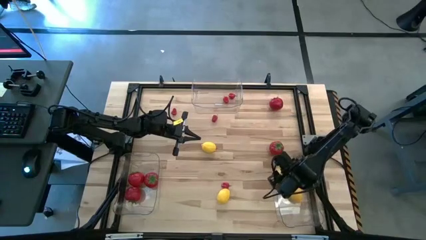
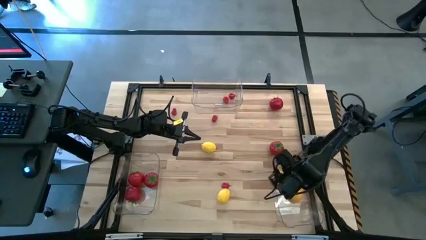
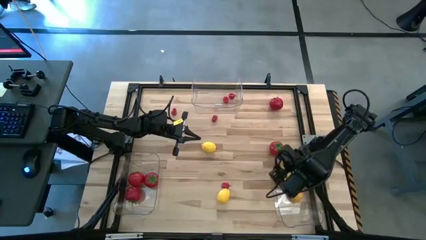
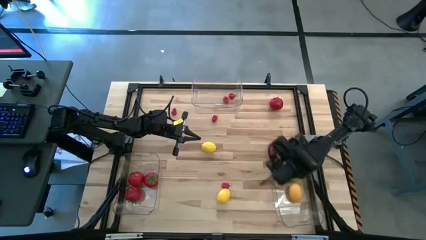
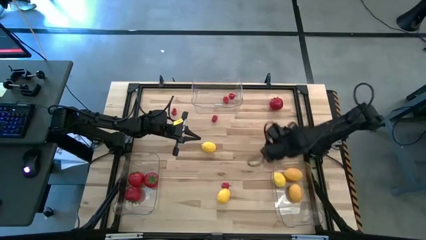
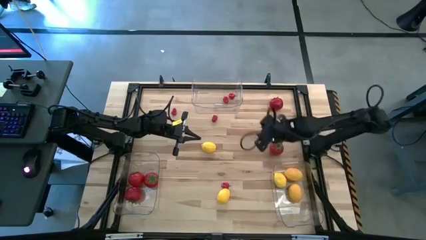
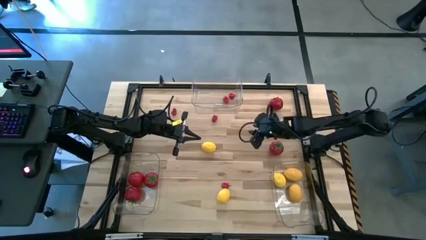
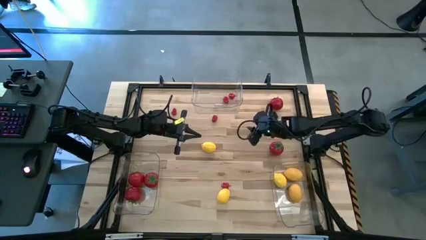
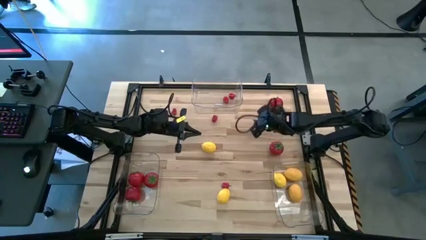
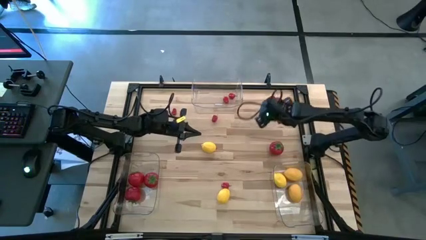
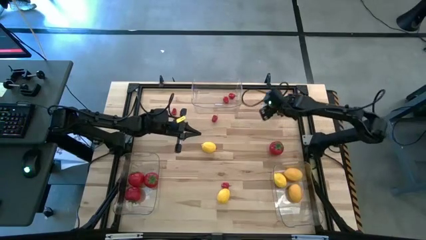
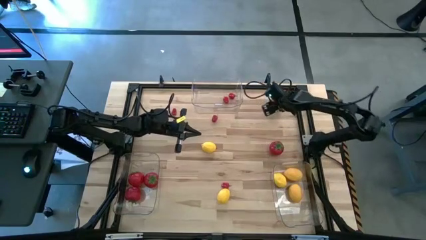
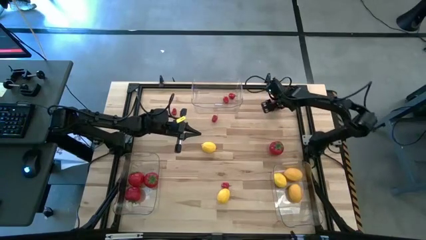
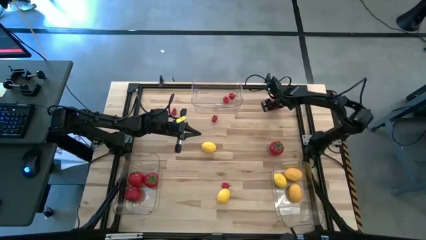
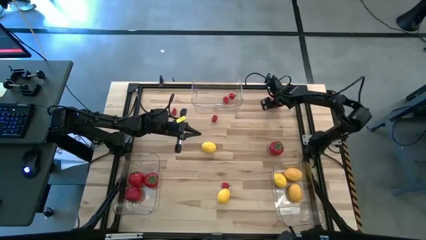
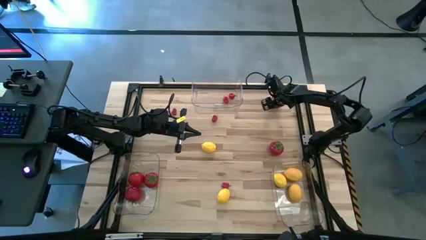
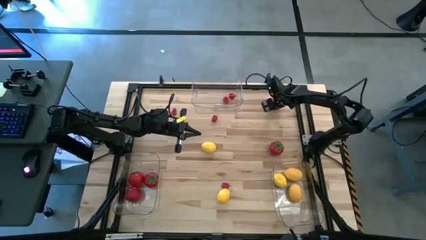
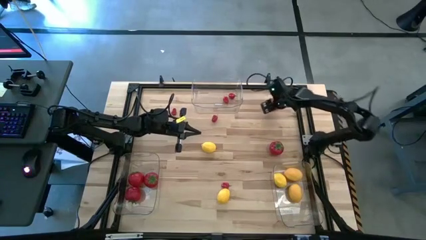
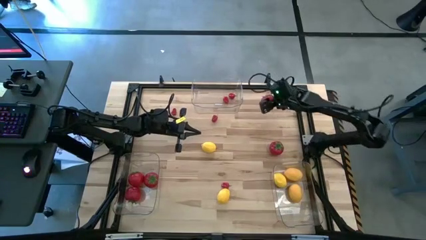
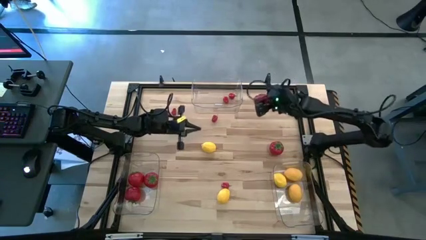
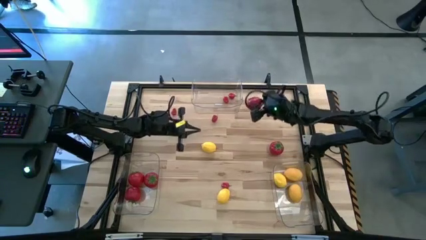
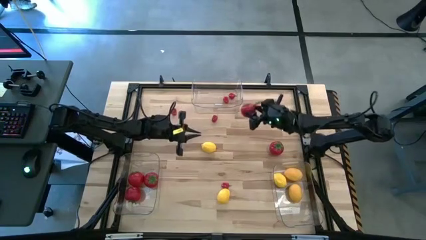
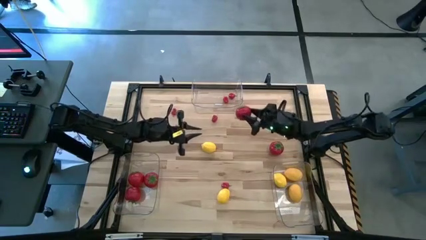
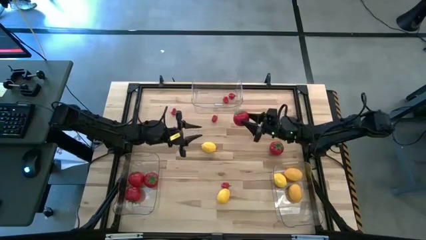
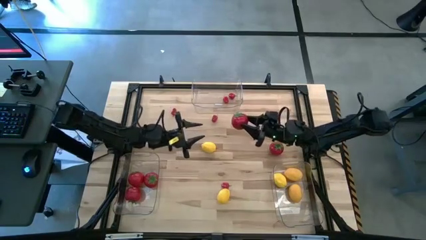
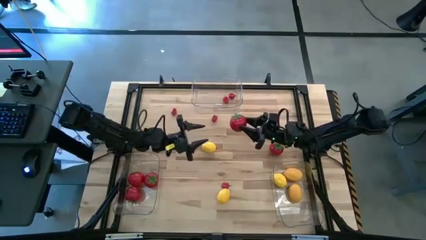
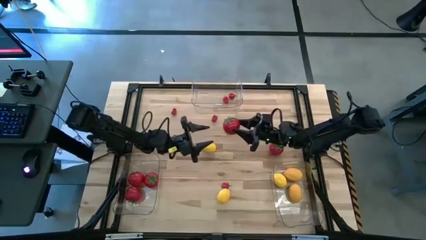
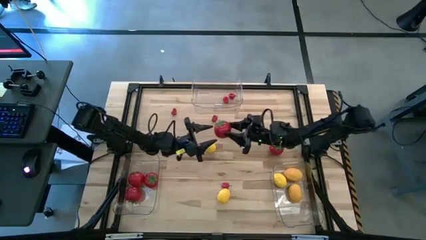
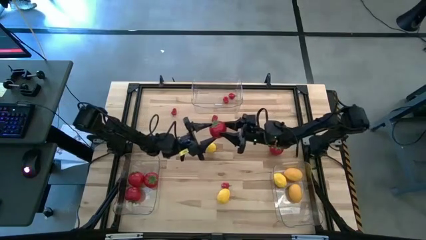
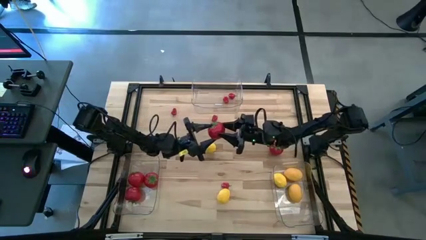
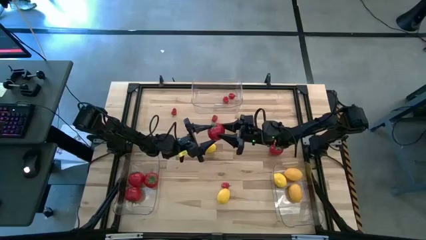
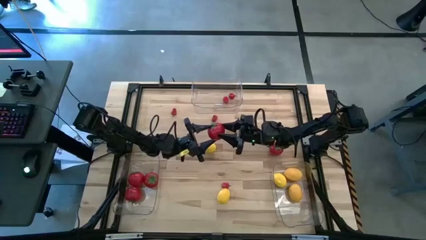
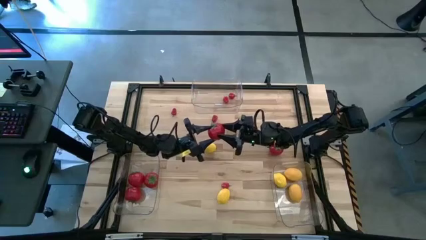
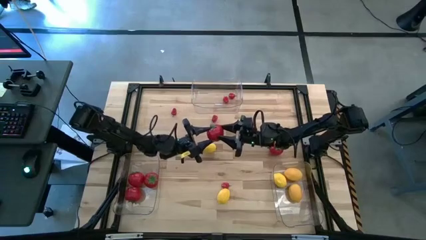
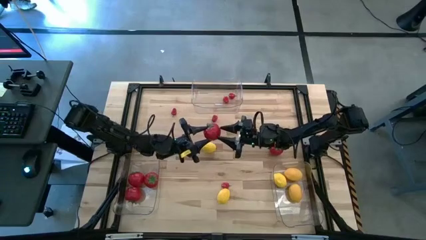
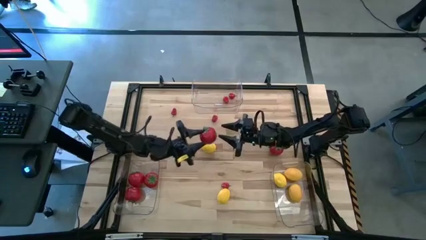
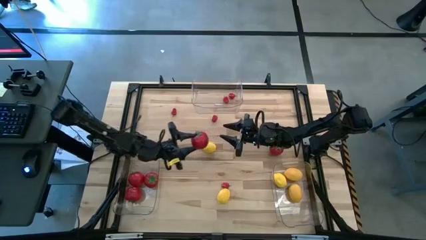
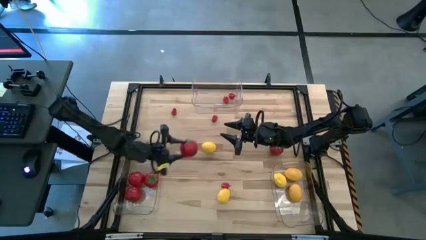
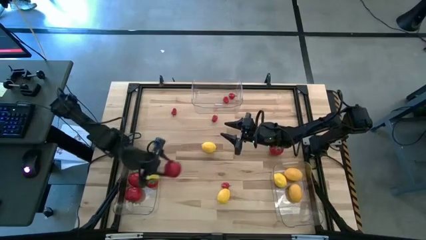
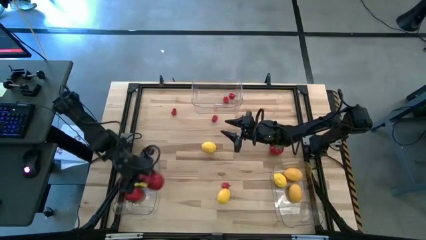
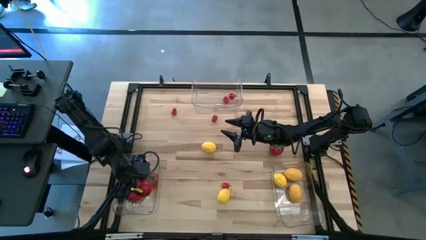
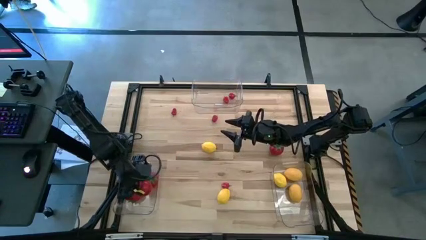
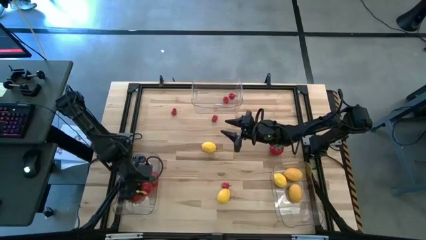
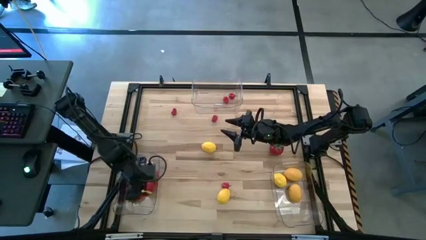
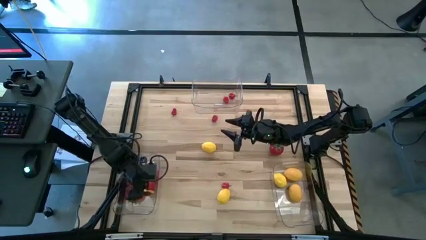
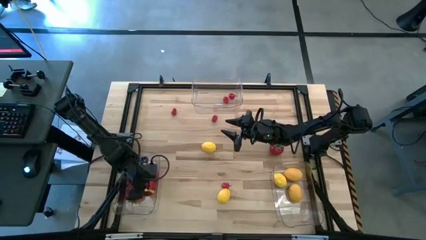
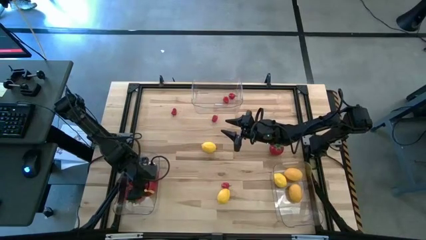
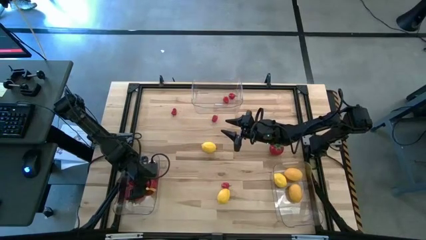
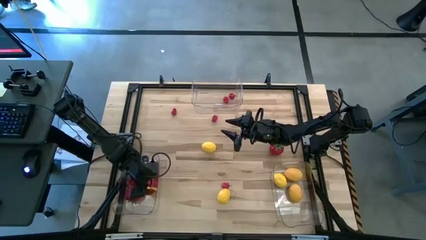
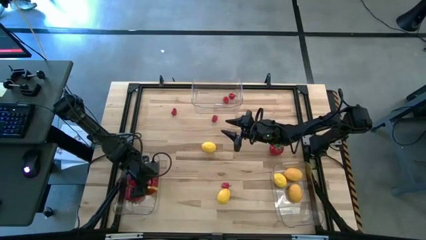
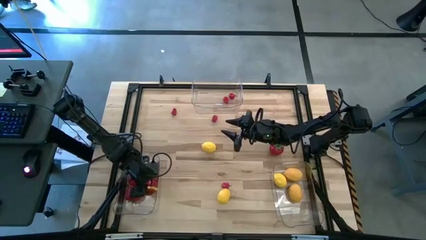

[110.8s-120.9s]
Task: Sort produce into baskets
Put the red tomato in the bottom left transparent bin

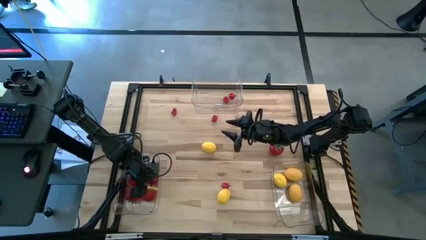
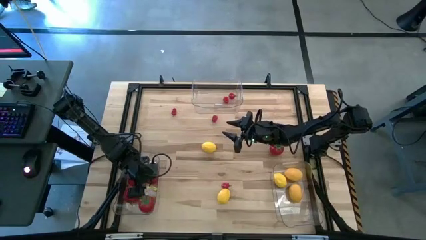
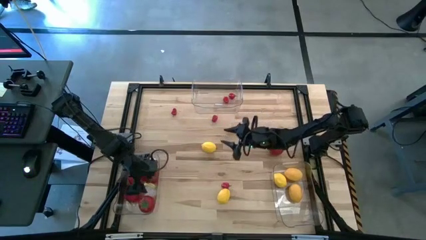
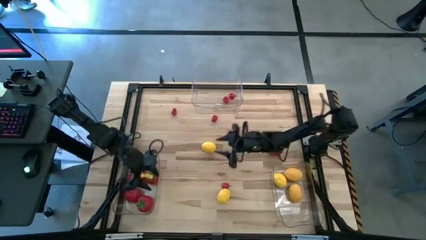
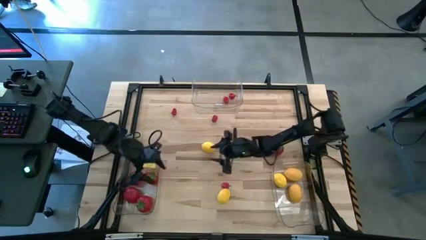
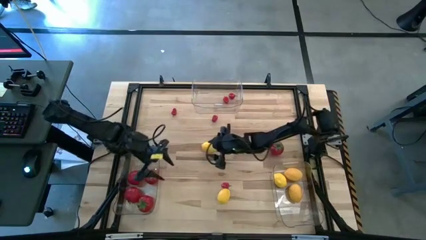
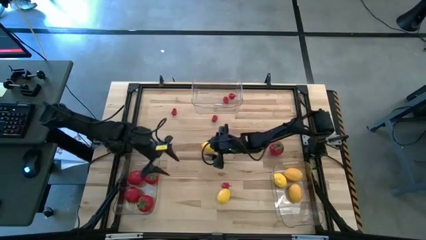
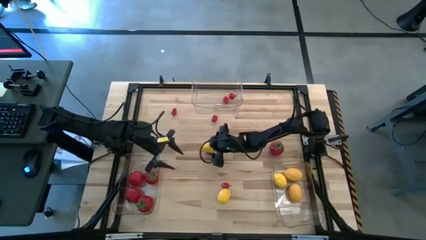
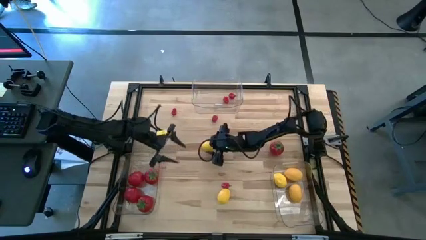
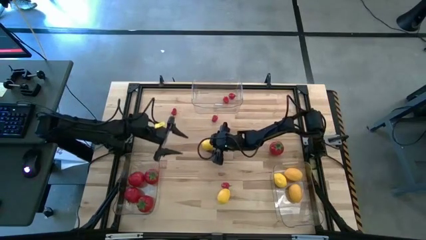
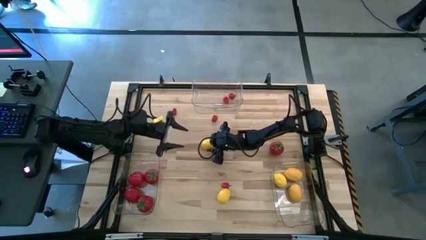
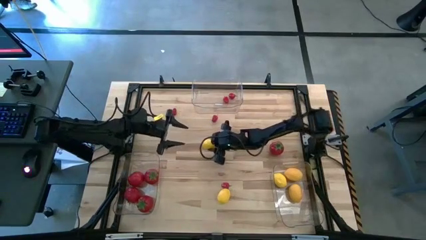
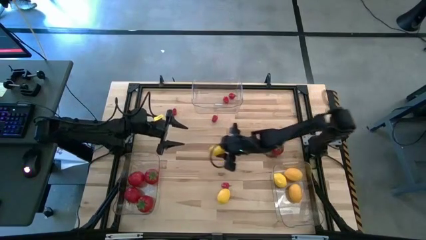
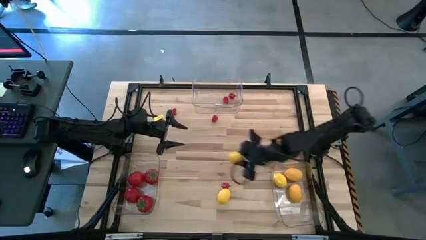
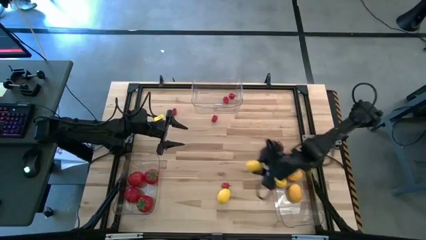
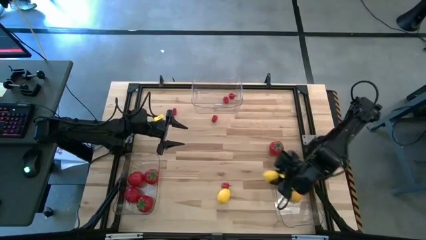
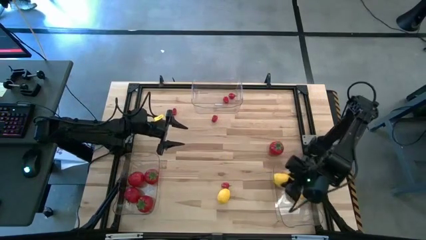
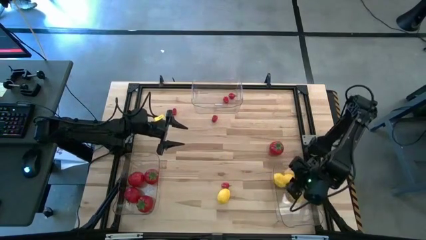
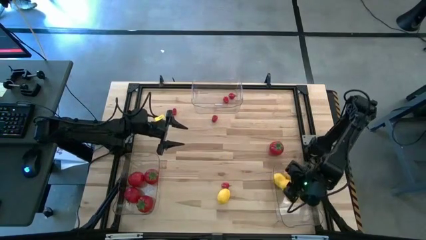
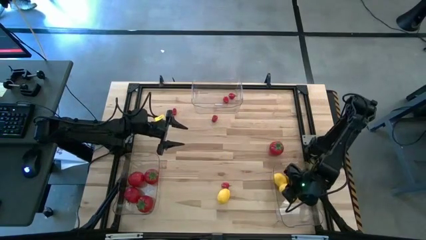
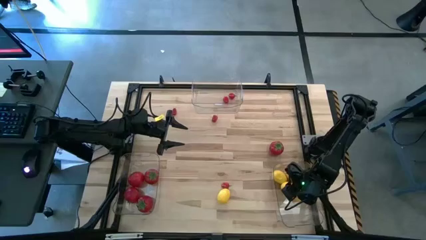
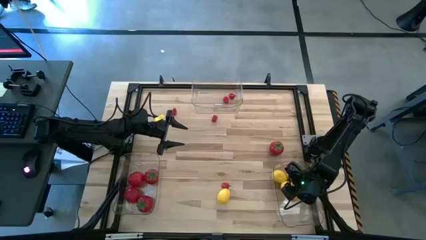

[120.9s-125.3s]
Put the yellow lemon into the bottom right transparent bin

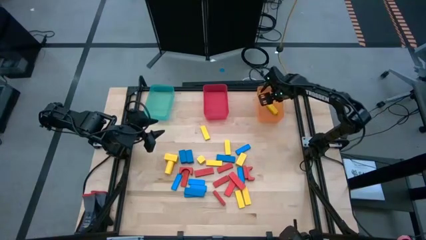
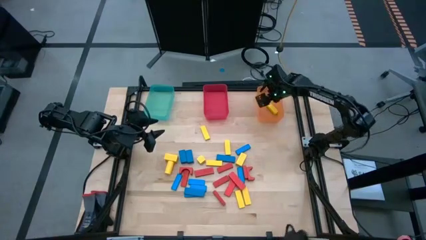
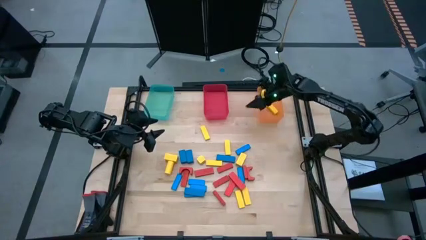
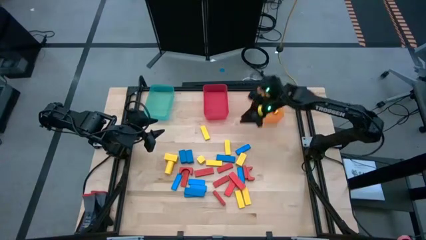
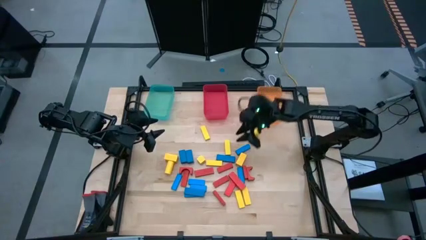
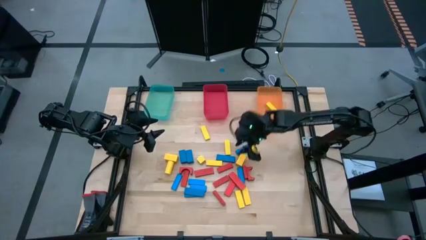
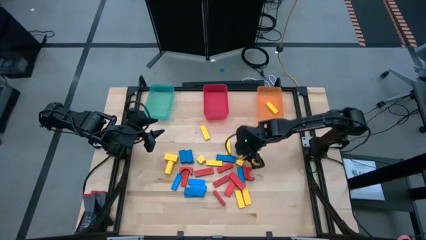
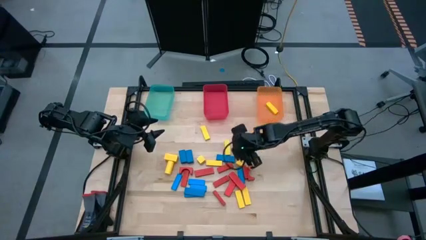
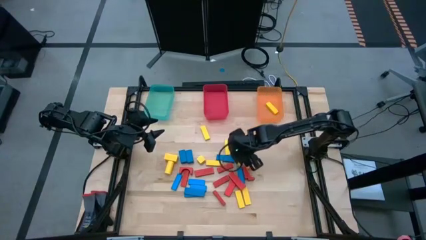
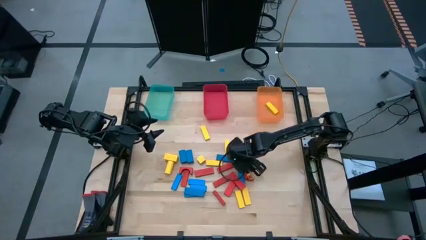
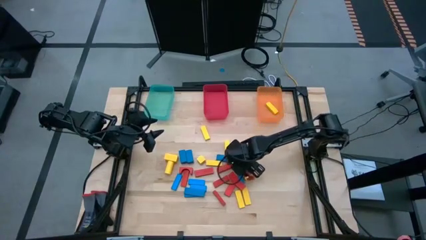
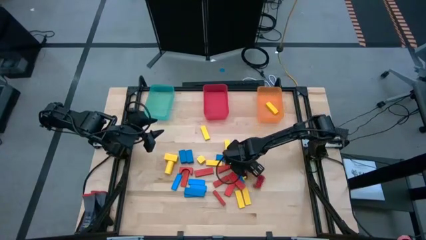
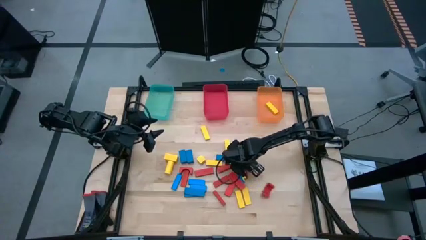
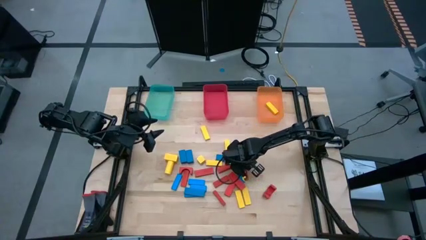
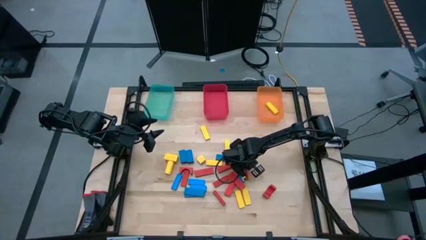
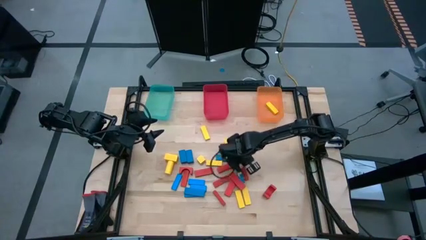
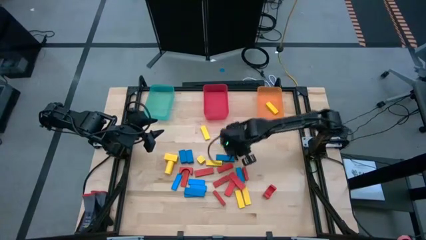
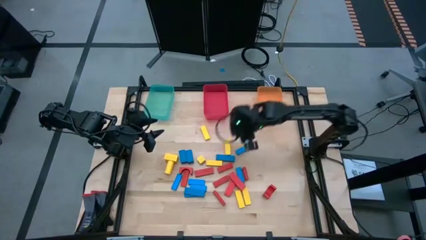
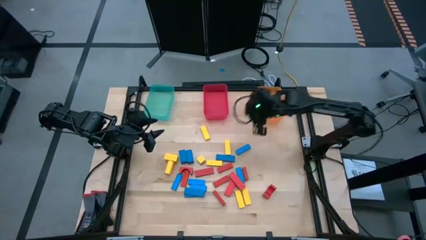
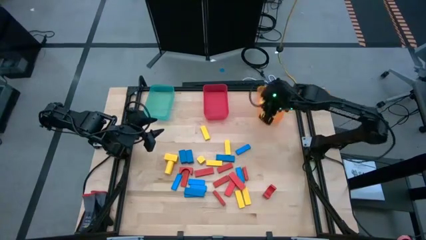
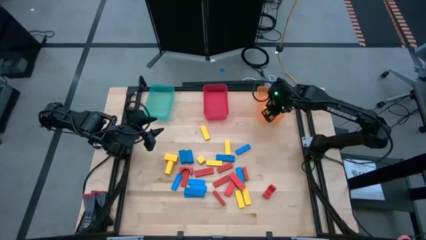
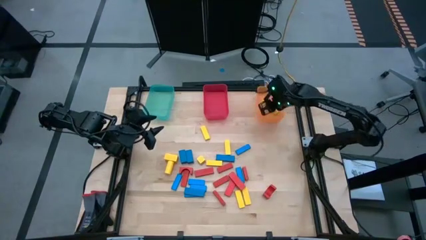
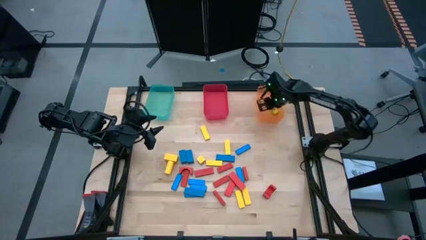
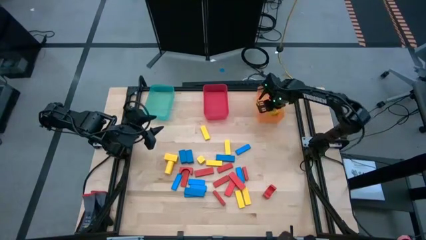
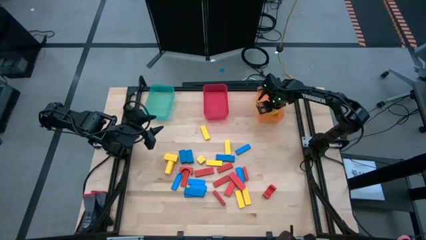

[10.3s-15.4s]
Task: Sort blocks
Put the yellow block into the orange bin
